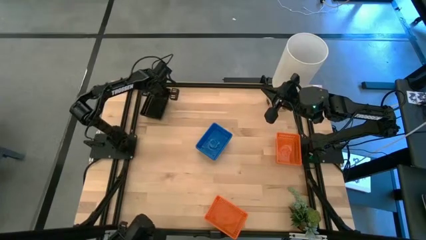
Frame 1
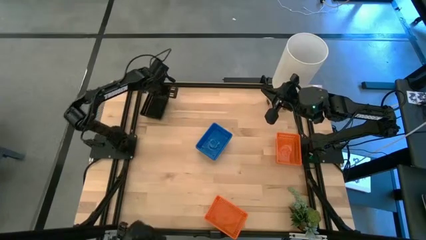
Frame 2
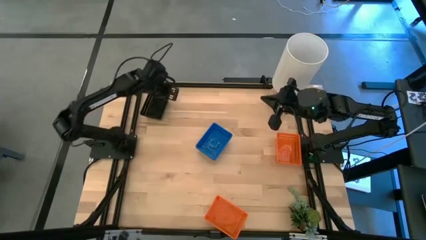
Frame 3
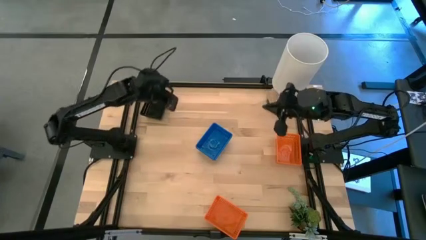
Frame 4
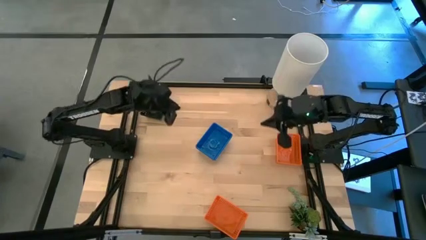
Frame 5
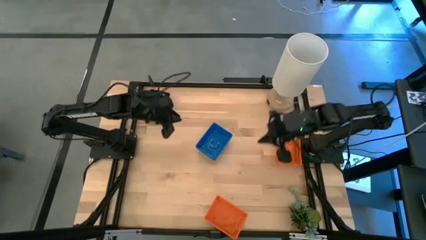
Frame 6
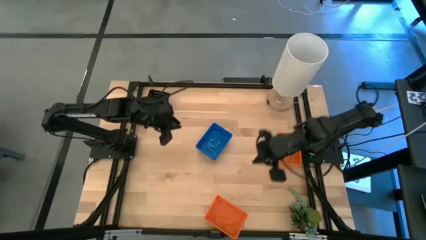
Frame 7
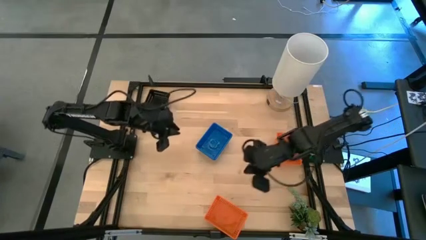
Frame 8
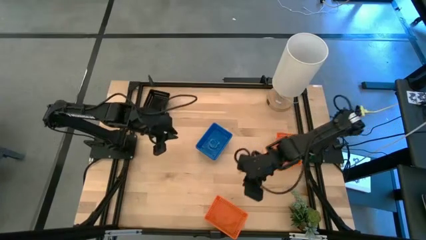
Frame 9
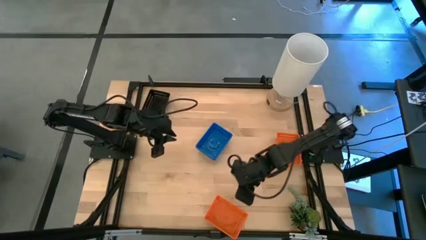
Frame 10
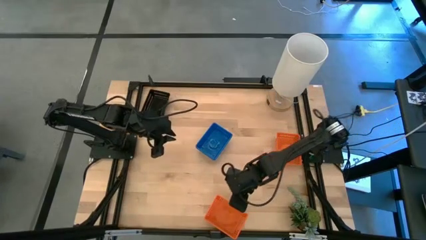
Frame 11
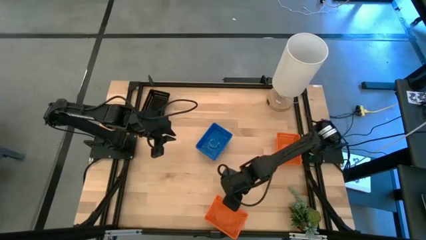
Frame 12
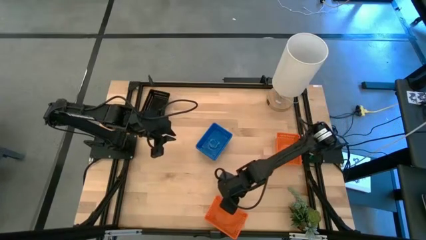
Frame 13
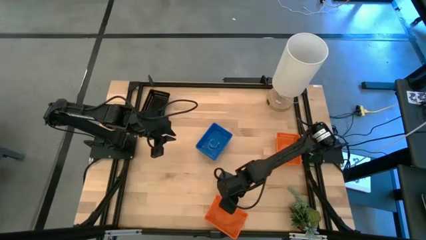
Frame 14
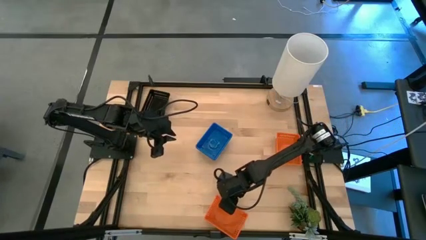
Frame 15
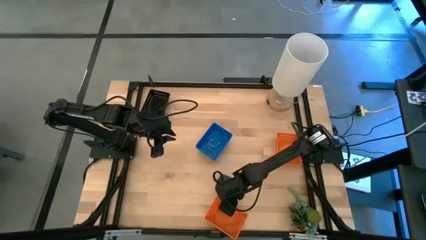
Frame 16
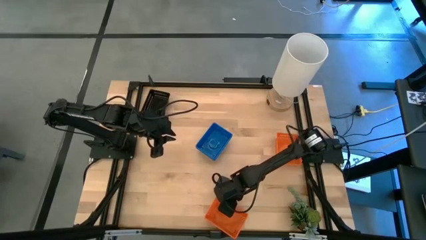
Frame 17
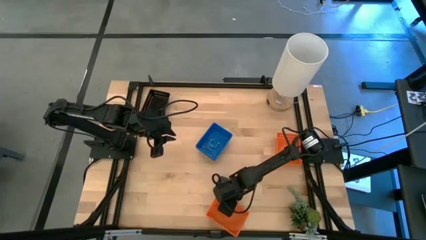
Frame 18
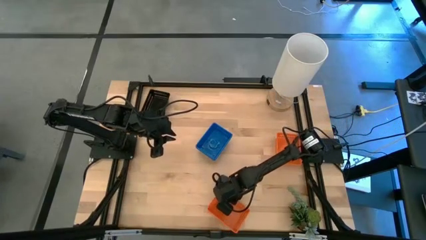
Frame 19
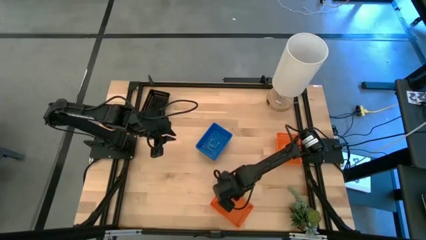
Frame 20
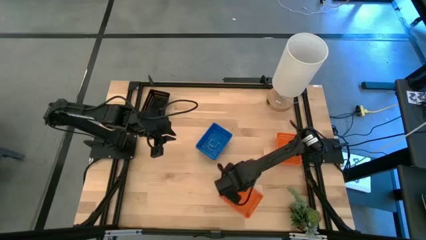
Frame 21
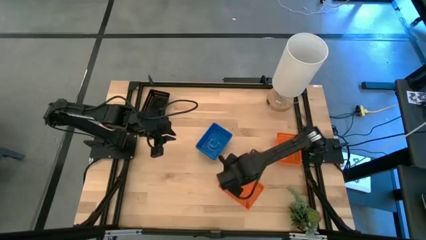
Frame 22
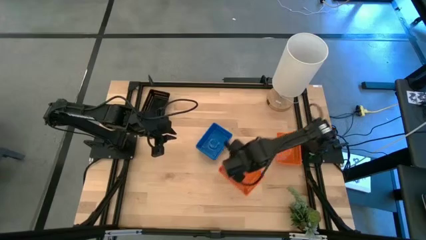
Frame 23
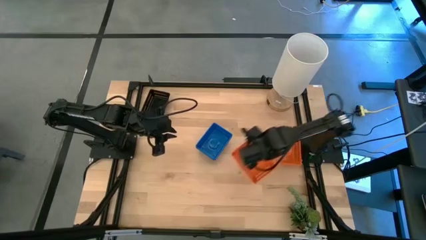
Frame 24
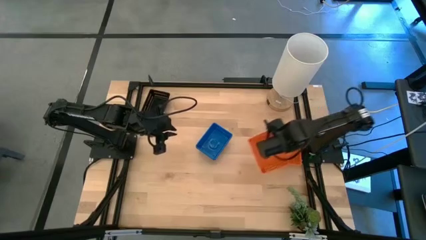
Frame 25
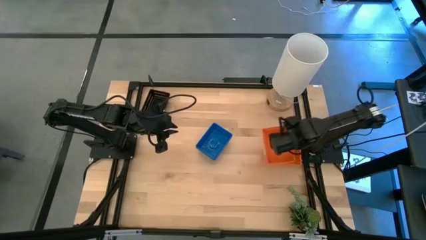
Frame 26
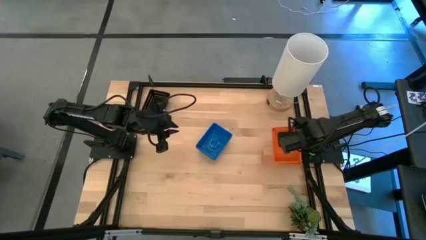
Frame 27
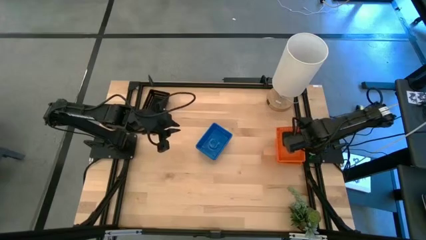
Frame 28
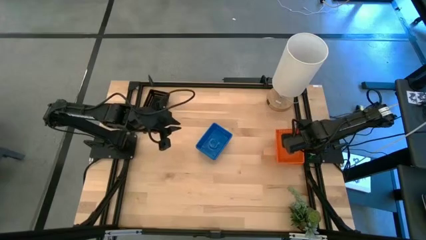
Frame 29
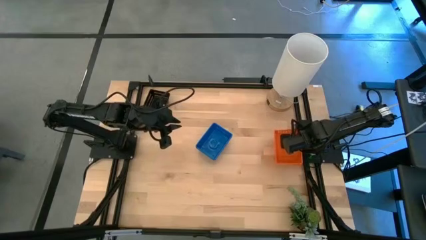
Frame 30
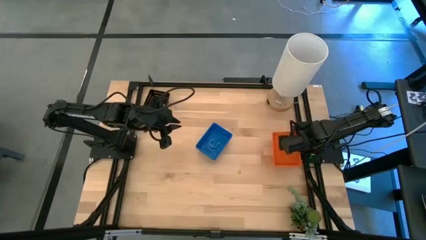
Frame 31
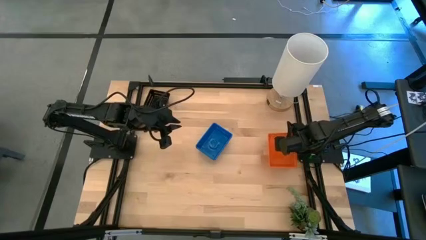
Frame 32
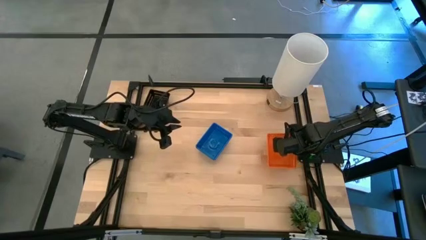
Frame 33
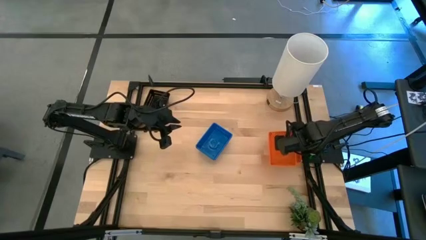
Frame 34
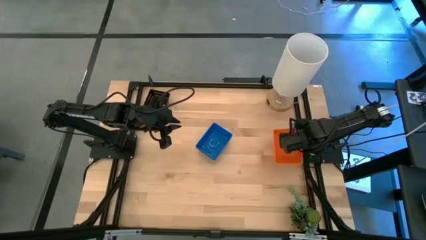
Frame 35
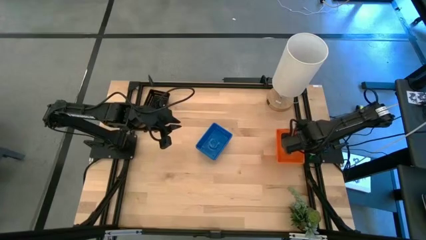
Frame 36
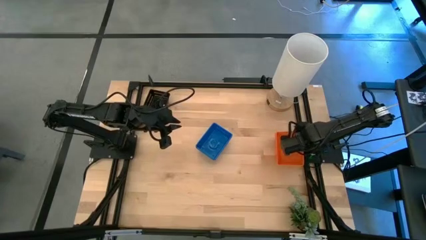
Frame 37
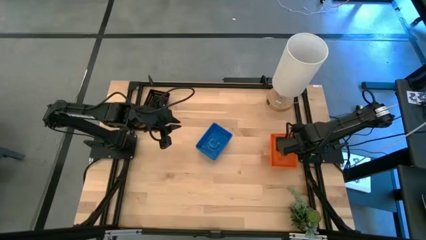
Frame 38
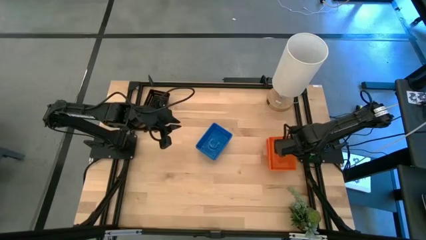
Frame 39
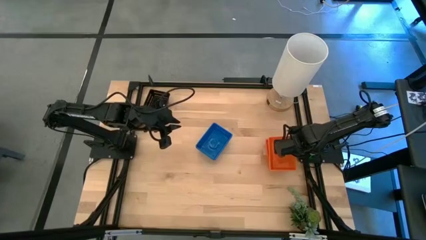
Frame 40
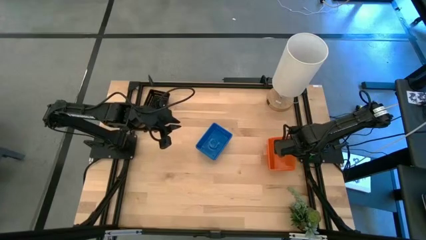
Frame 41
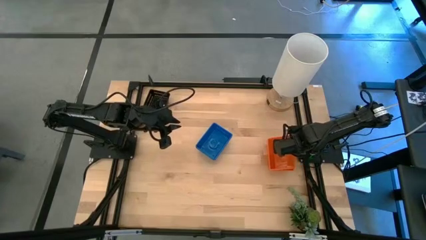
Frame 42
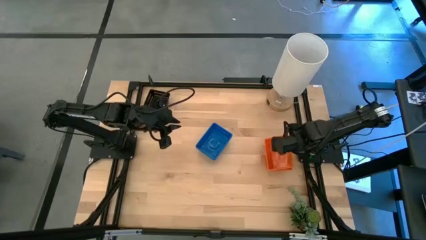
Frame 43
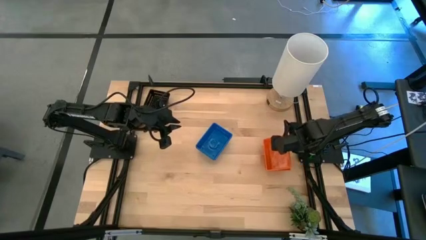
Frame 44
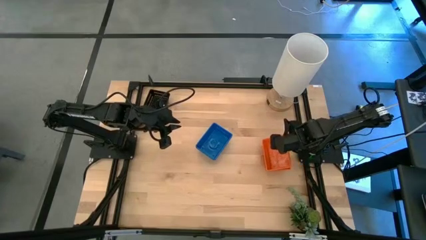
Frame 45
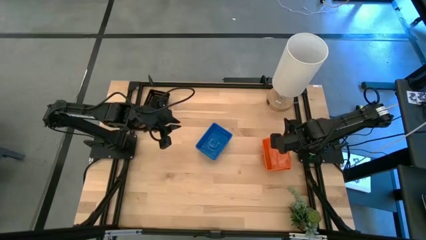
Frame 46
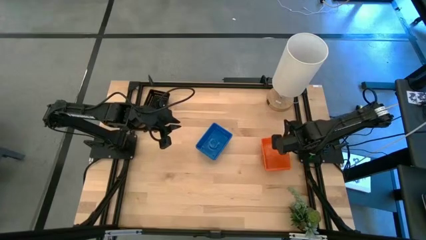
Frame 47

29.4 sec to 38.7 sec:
Stack the bottom orange bin on the top orange bin

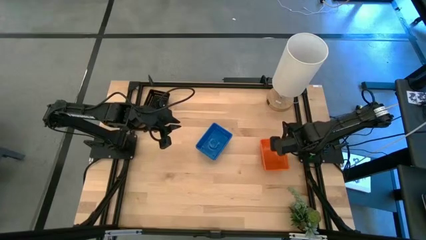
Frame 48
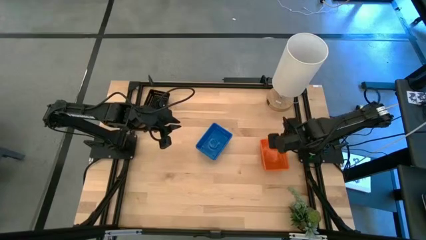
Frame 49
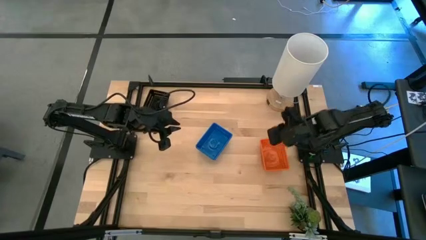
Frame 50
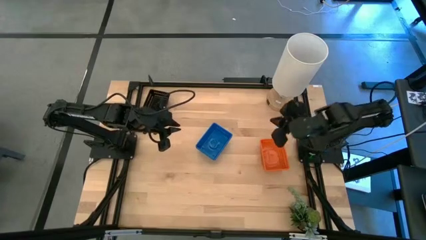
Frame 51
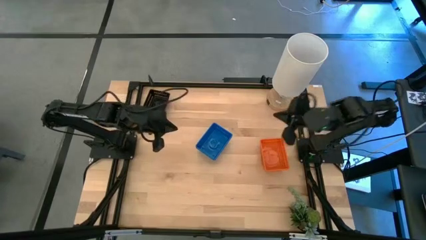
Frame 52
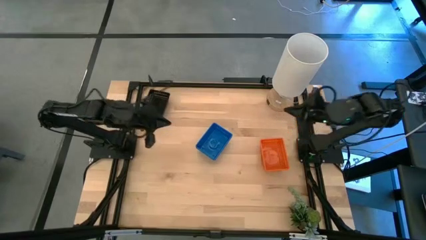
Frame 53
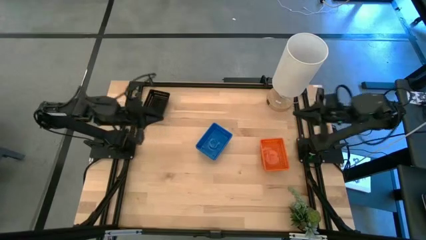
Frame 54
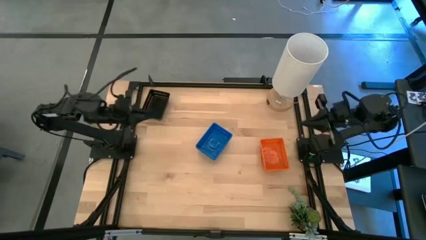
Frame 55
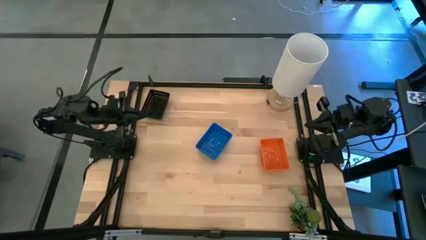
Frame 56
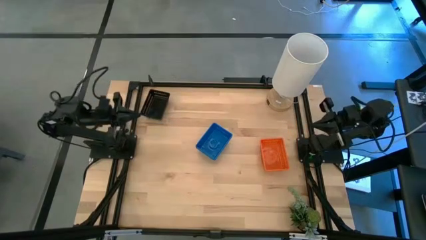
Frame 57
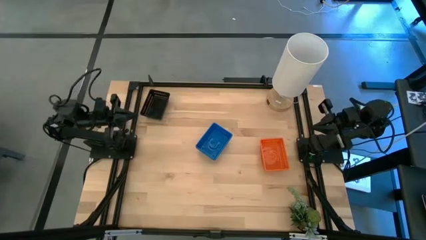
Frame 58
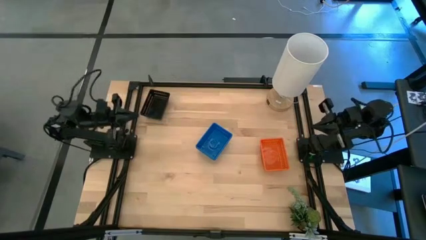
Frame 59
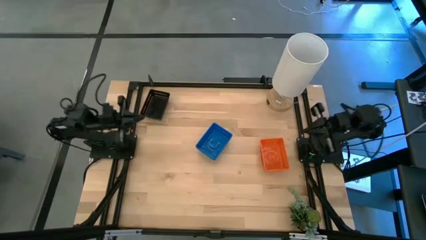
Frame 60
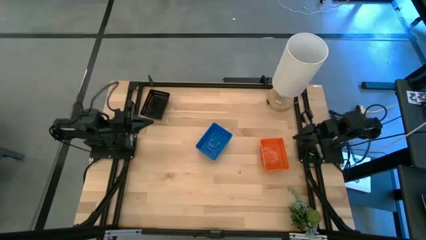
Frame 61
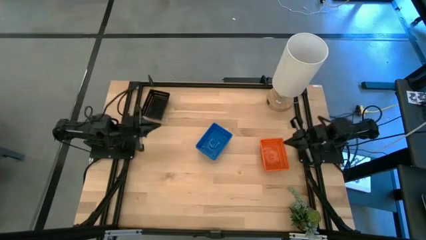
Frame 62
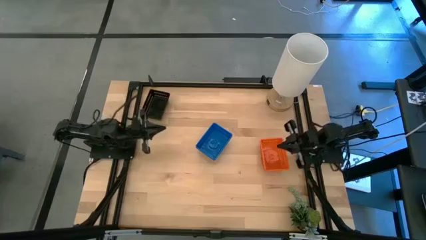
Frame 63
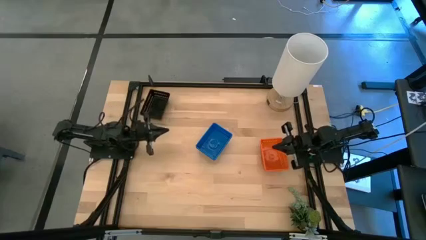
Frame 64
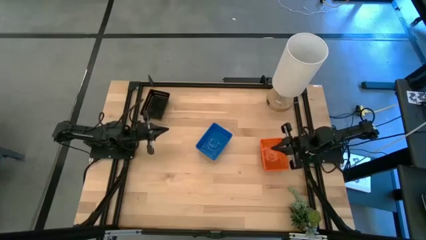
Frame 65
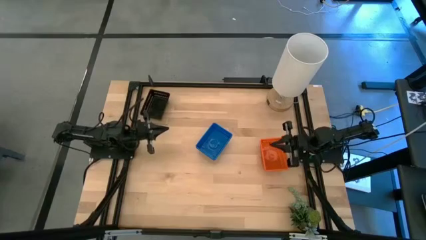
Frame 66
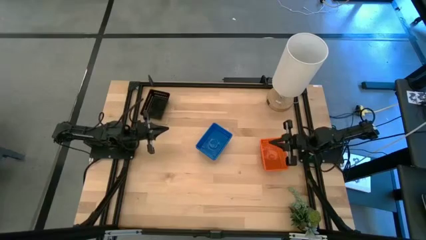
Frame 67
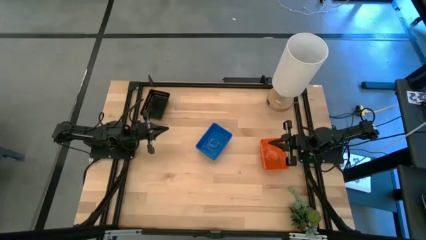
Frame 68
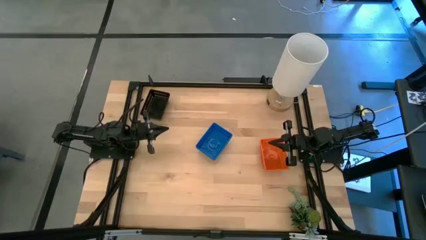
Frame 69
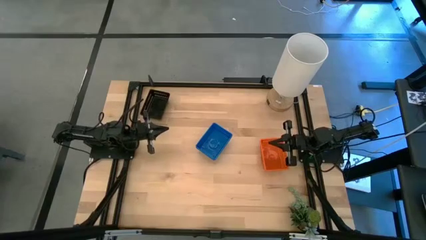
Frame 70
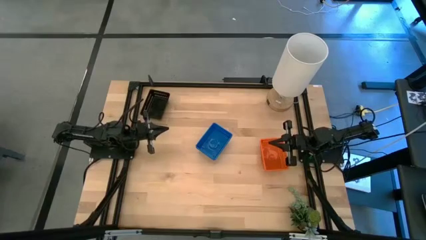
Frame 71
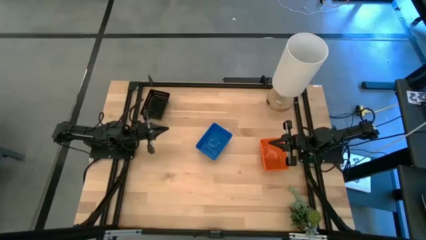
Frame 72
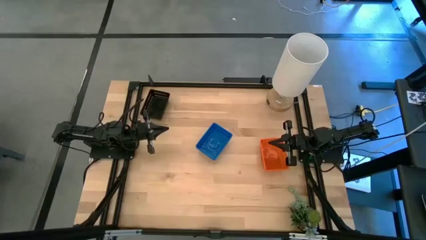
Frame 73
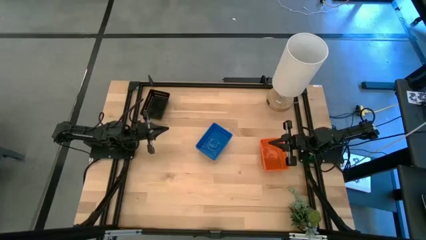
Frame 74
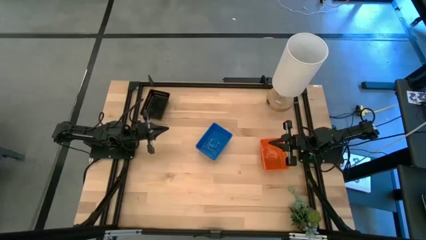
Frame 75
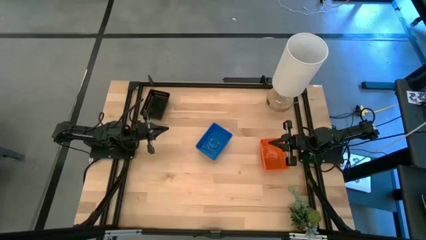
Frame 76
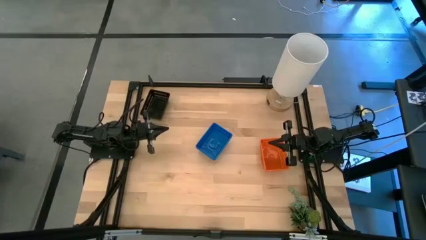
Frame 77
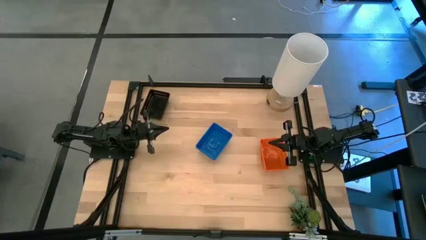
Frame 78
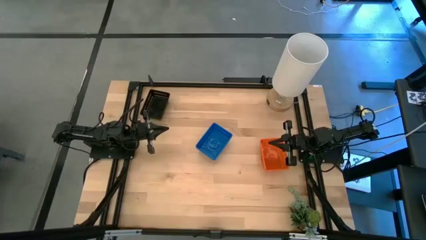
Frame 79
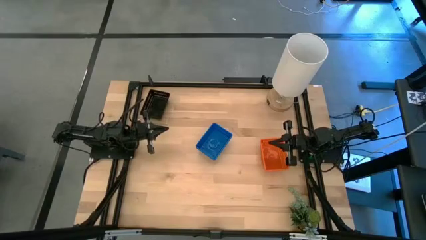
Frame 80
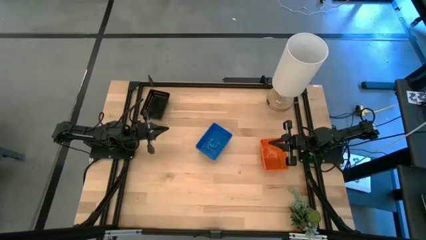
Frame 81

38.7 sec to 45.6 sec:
Return to Home Position
